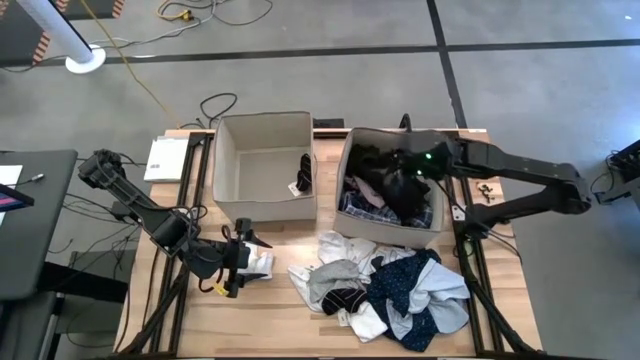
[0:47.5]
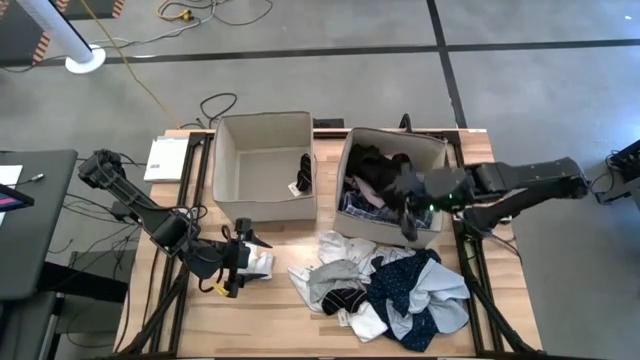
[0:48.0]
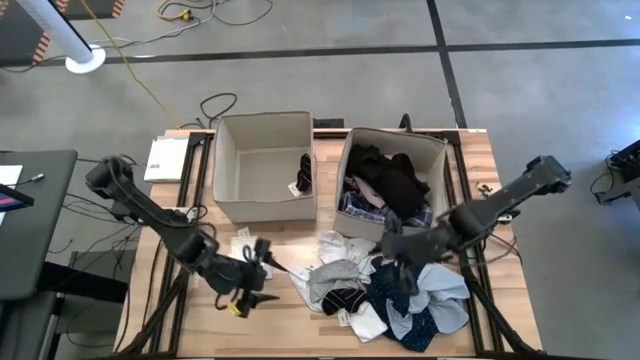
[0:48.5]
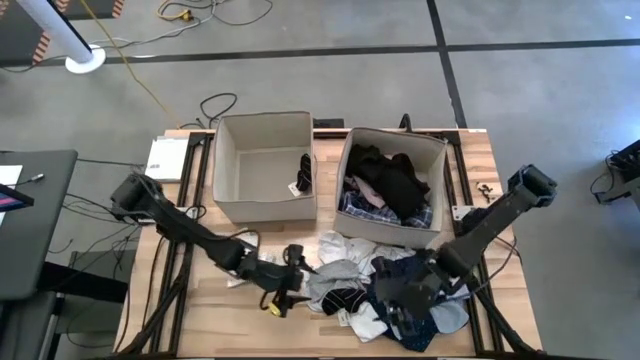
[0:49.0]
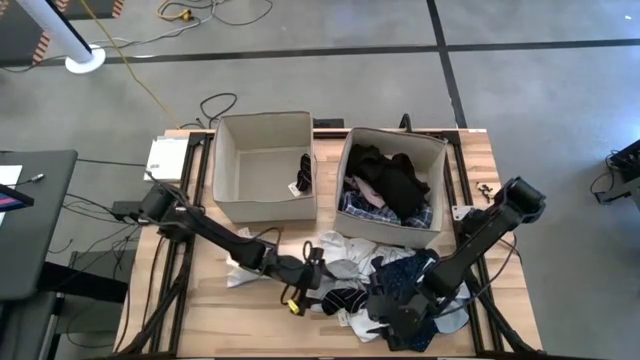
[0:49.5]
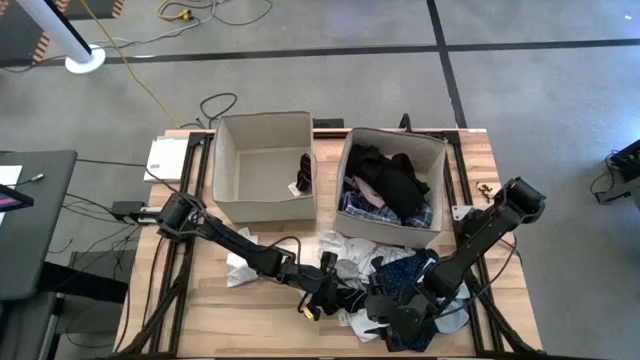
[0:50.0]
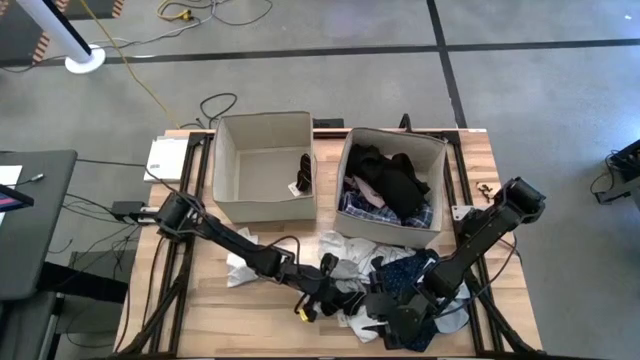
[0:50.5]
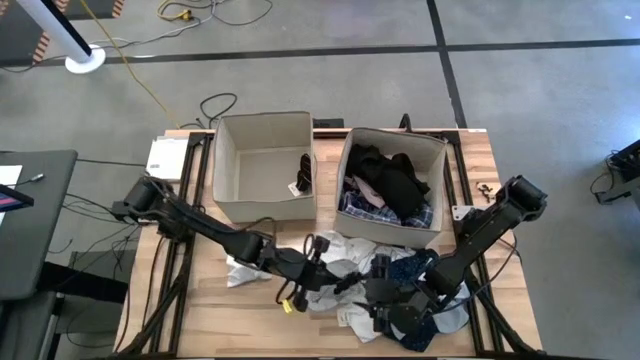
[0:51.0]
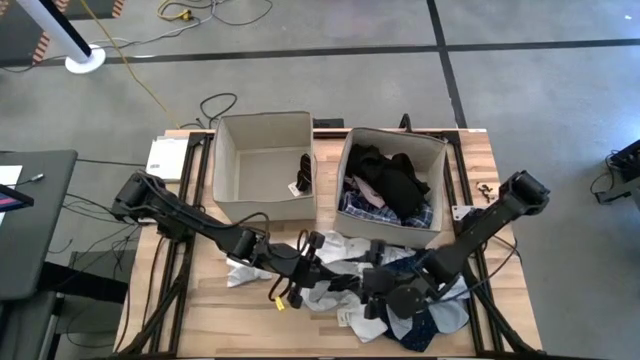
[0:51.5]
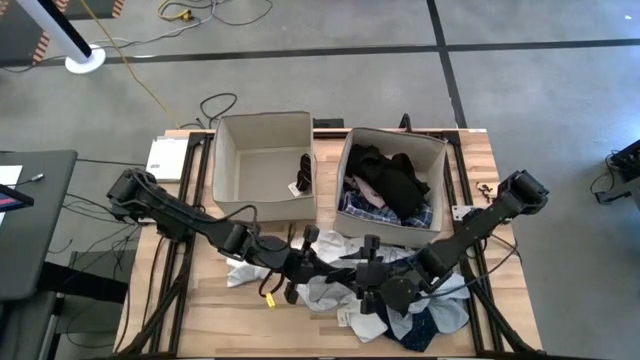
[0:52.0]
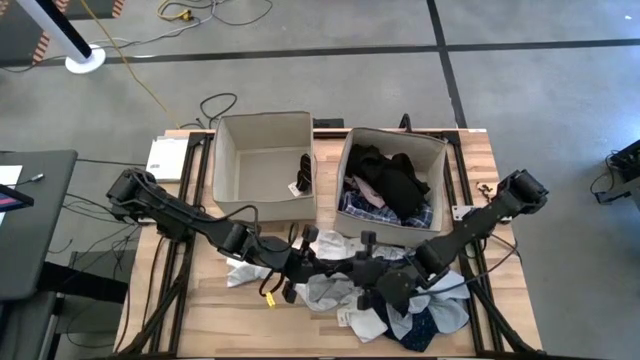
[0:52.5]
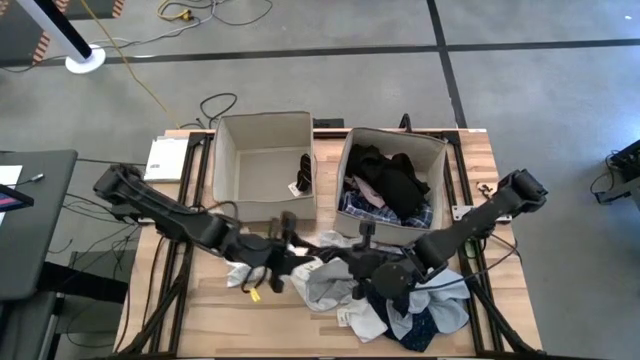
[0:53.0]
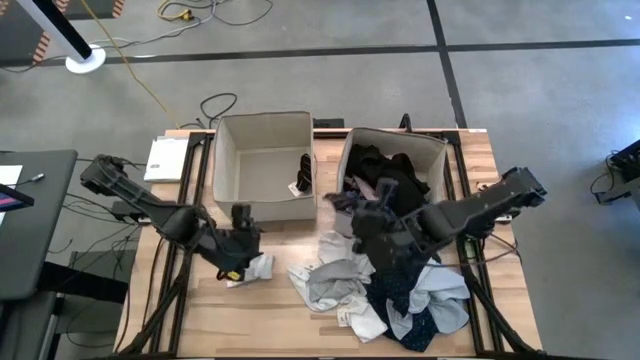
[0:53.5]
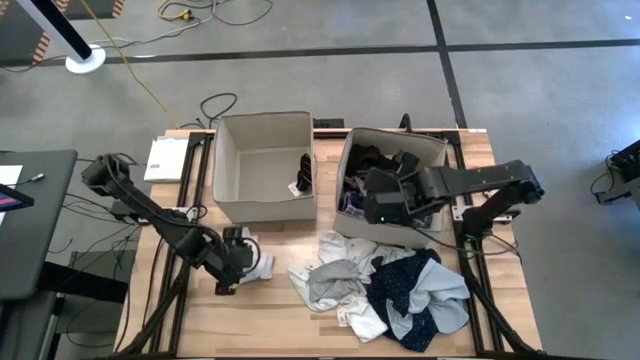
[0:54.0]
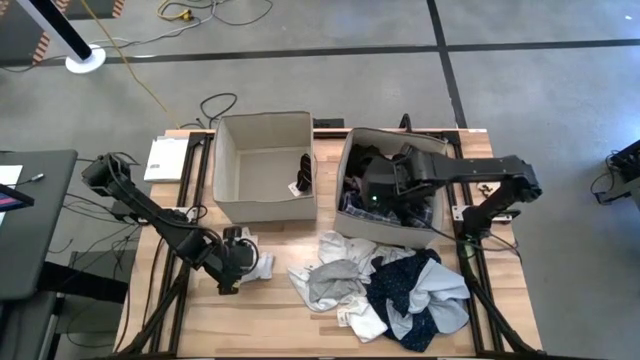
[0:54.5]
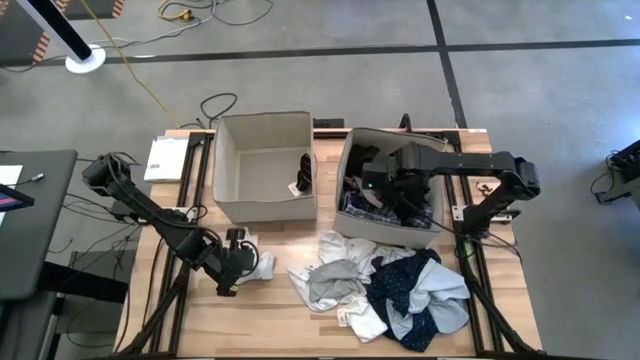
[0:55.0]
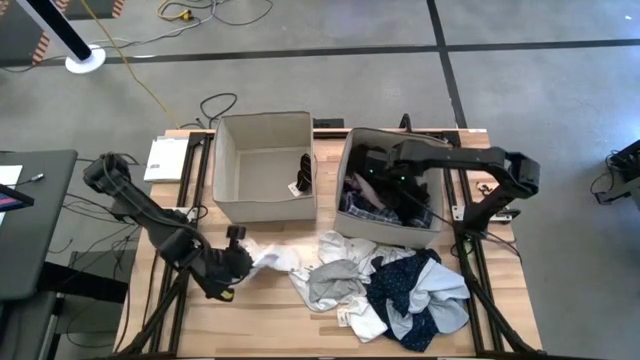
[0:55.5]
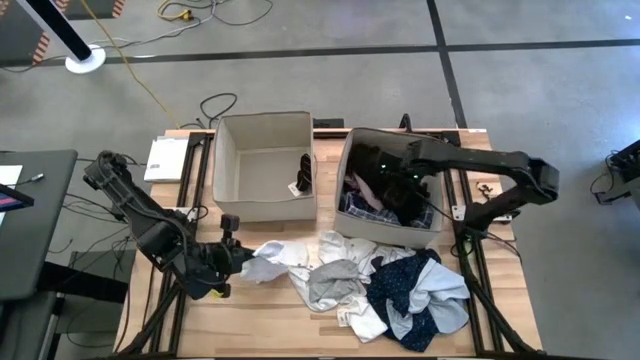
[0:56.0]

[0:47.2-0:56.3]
Task: Sort clothes
Put the black sock into the right white laundry bin

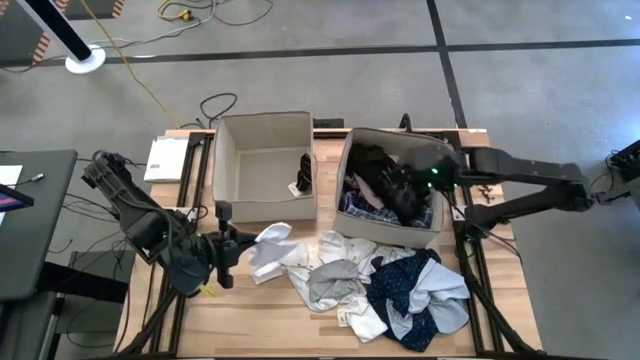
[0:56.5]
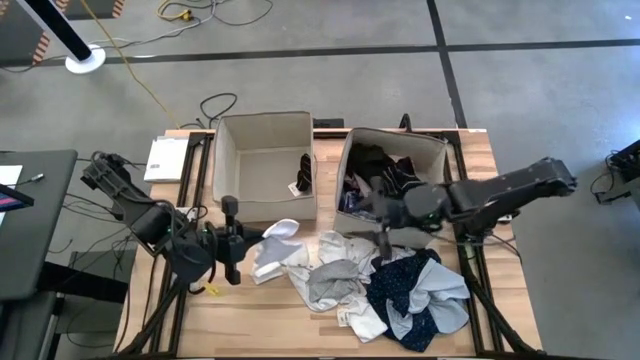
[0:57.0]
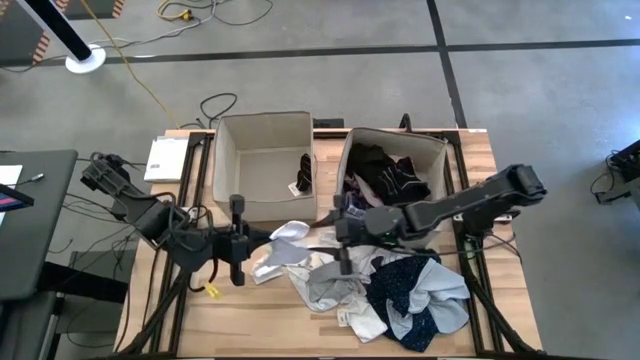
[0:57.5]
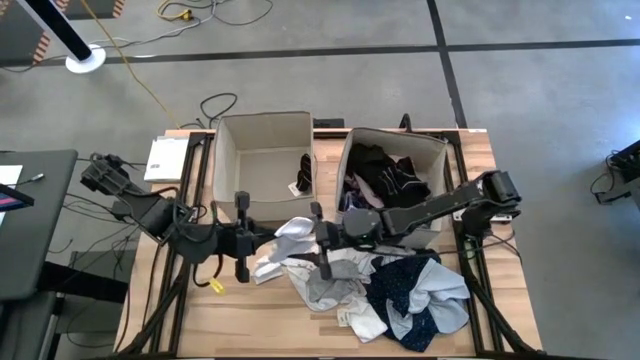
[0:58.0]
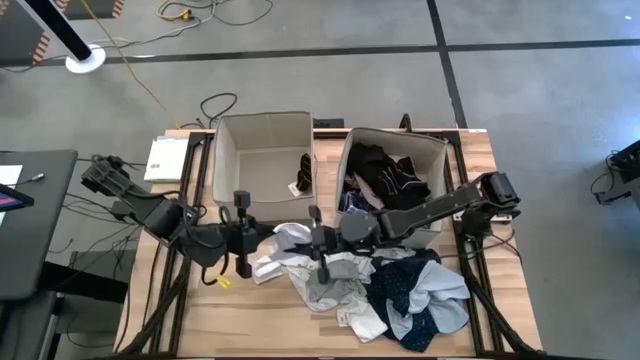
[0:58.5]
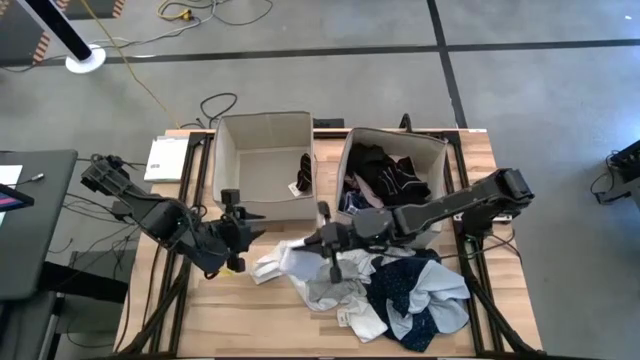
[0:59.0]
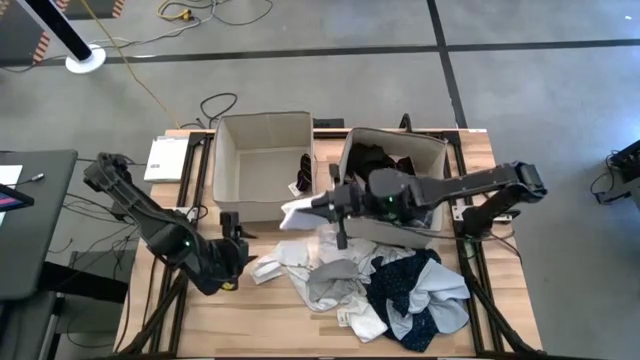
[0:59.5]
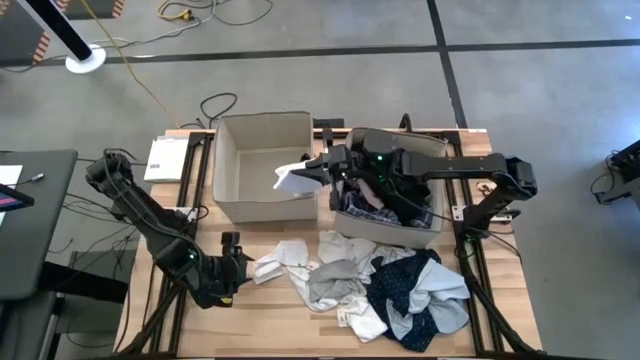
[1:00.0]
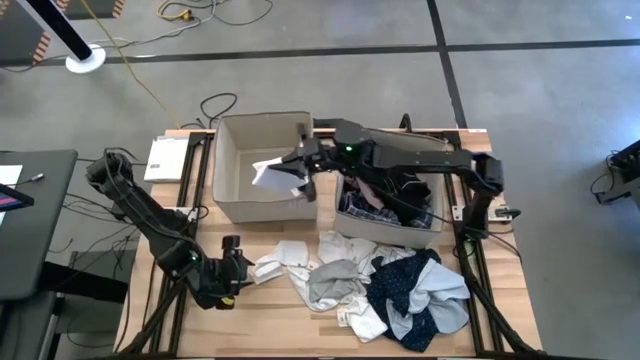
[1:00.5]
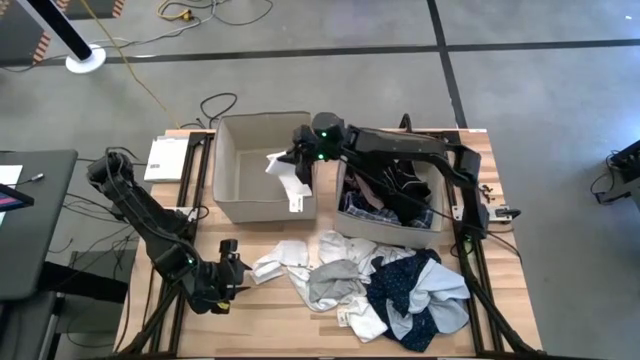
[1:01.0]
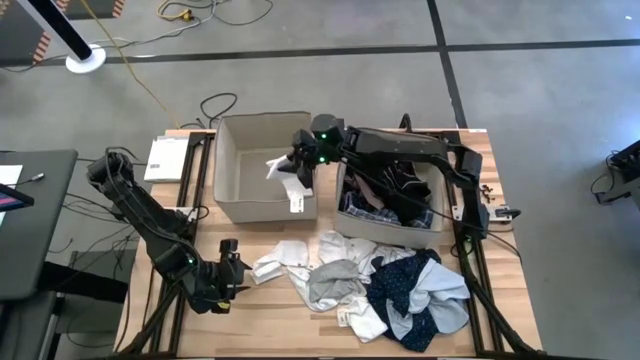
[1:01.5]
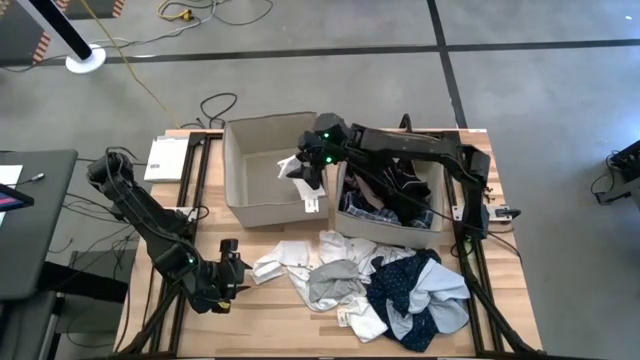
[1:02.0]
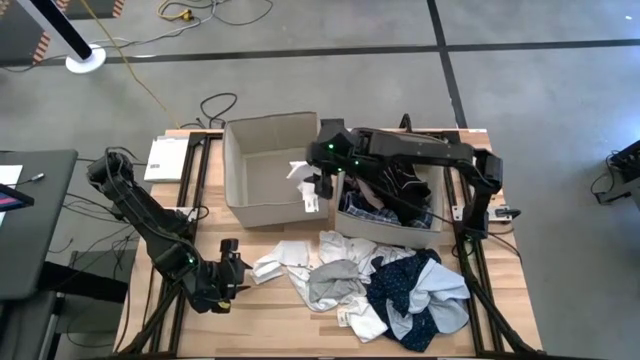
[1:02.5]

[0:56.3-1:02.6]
Put the white sock into the left white laundry bin

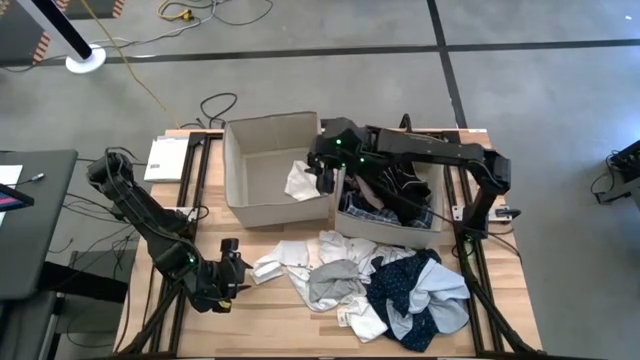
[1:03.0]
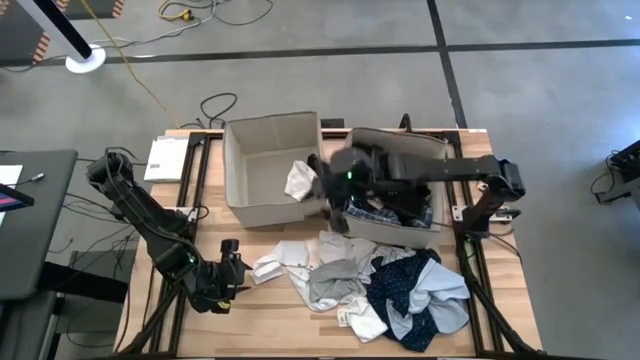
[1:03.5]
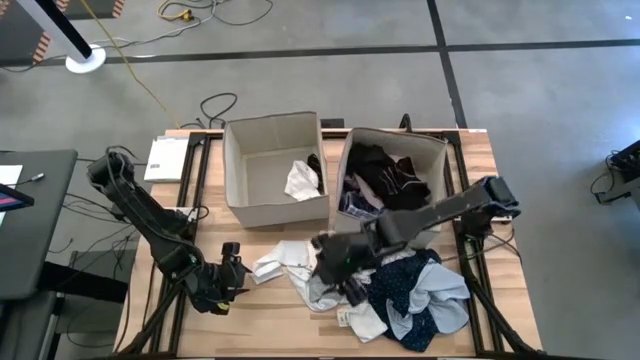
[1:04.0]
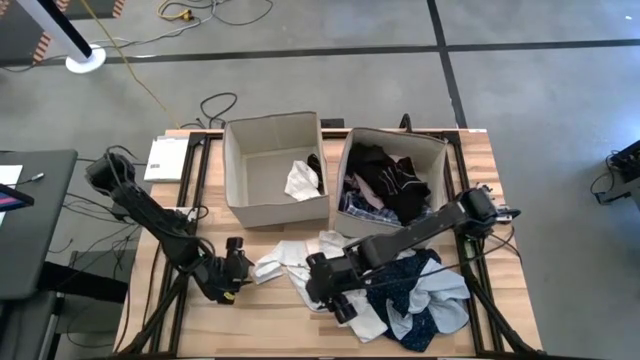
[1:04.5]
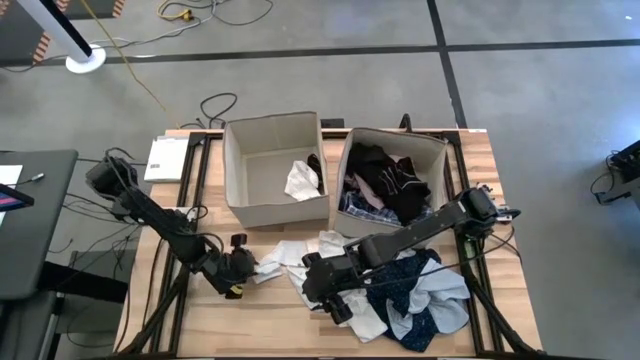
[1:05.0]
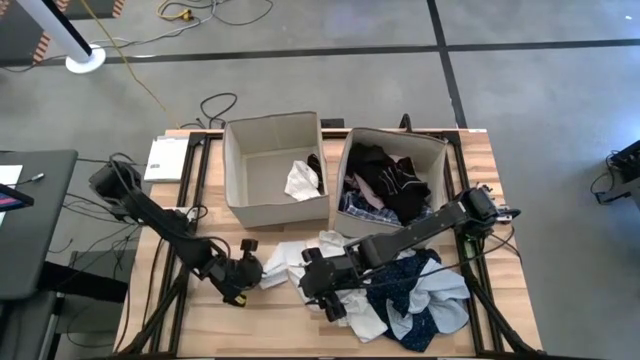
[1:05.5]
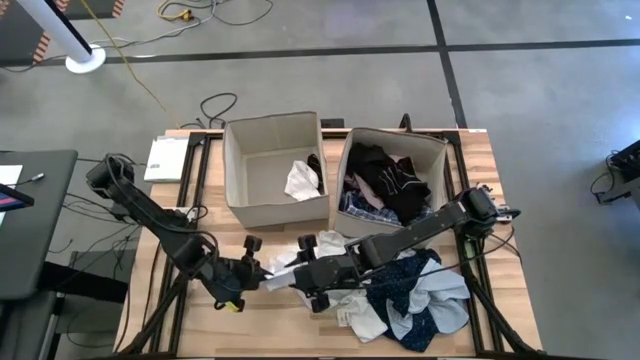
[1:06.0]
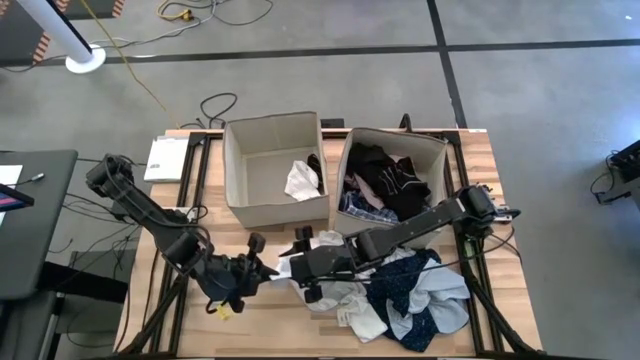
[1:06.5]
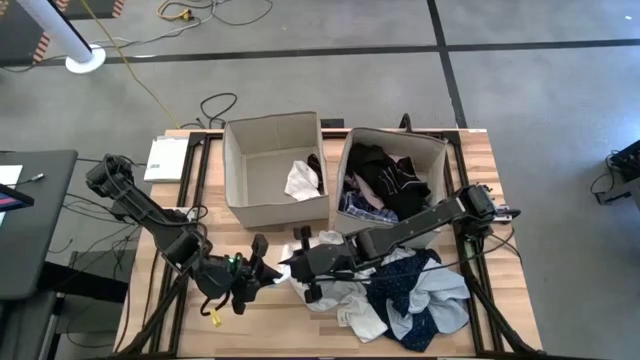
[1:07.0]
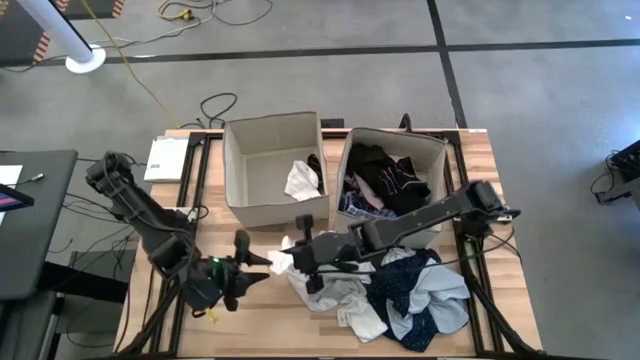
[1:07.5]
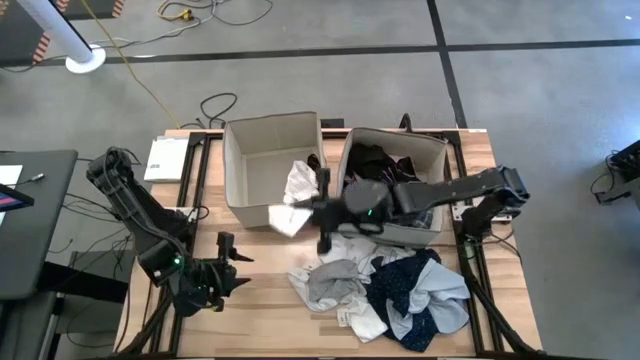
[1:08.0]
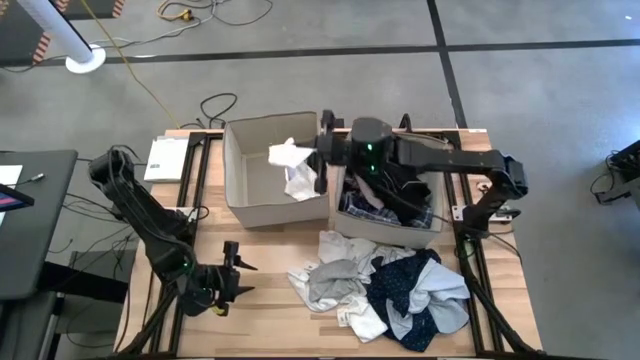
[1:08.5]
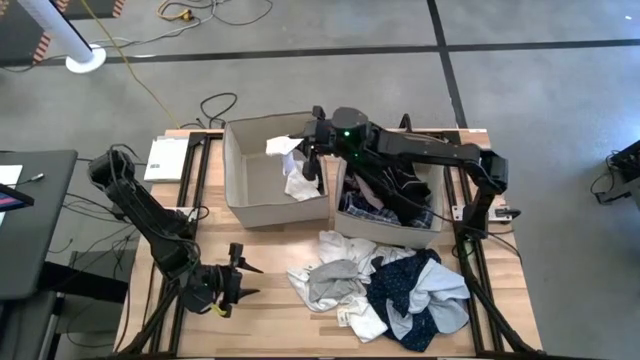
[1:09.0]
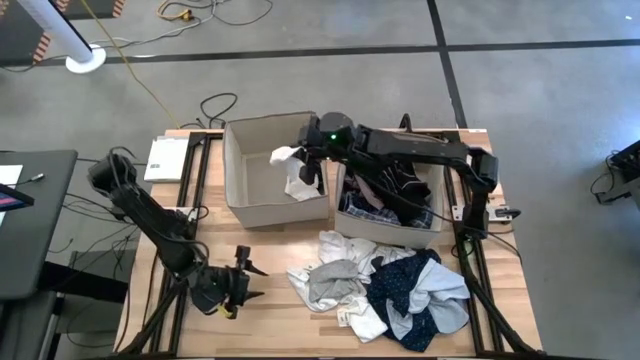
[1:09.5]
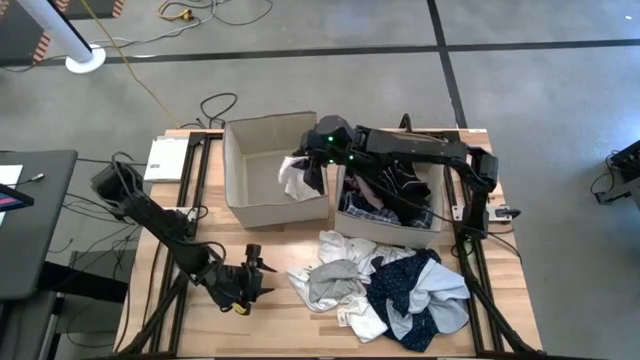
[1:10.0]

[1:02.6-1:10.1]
Put the white sock into the left white laundry bin
